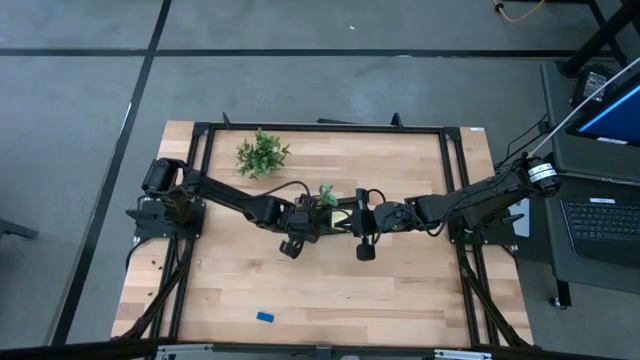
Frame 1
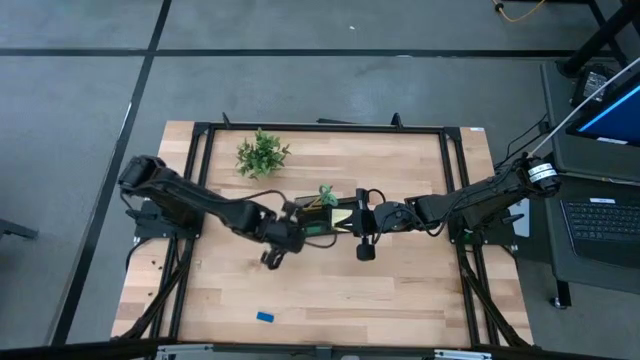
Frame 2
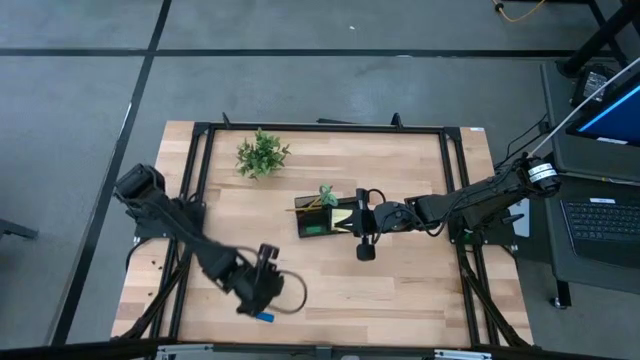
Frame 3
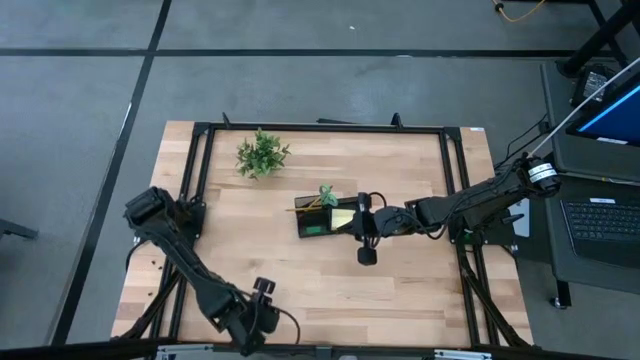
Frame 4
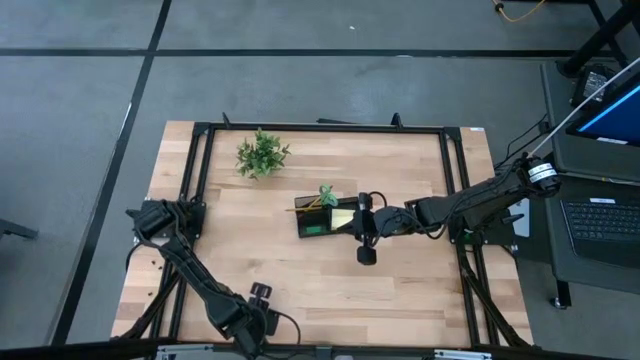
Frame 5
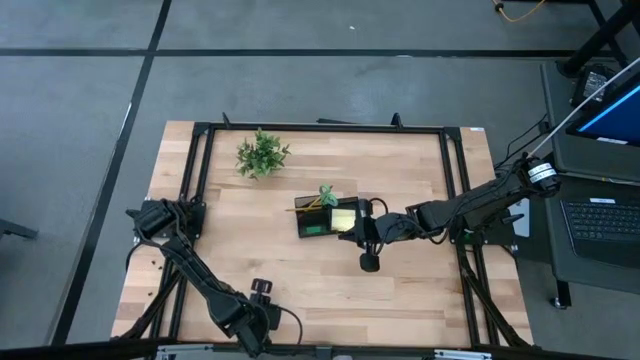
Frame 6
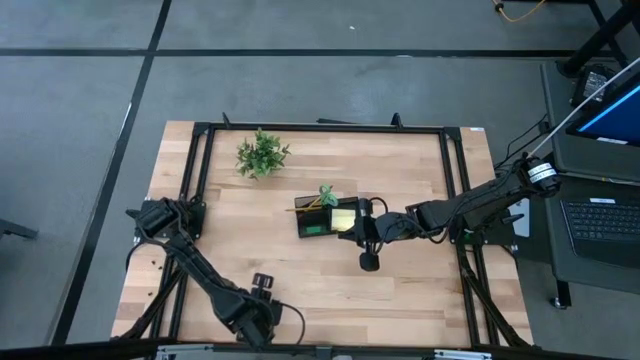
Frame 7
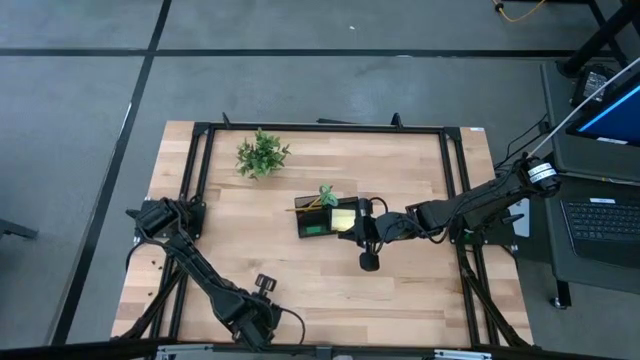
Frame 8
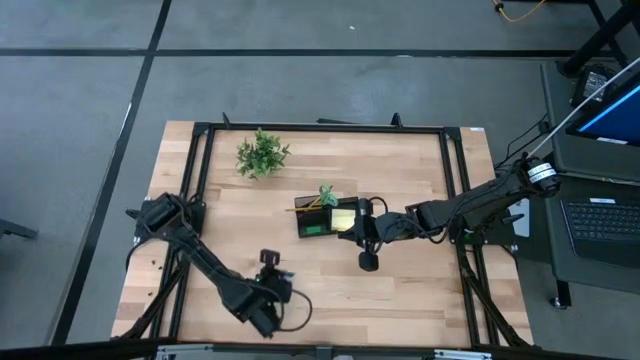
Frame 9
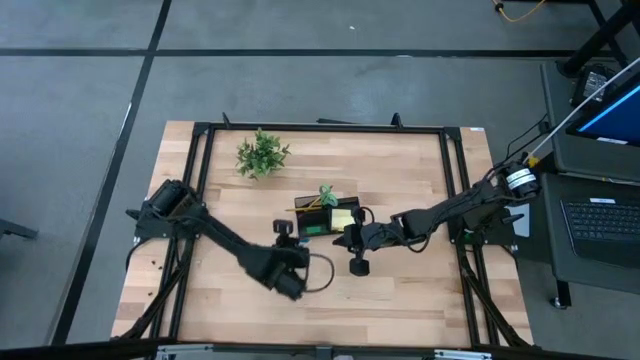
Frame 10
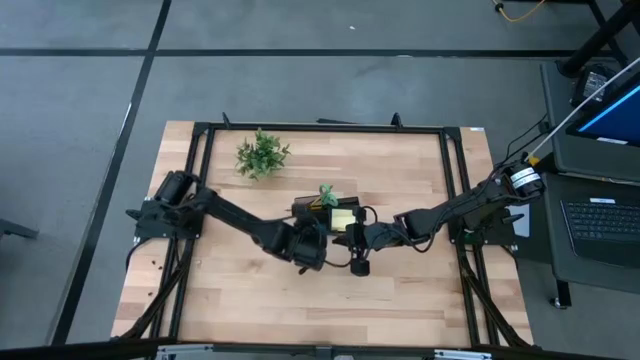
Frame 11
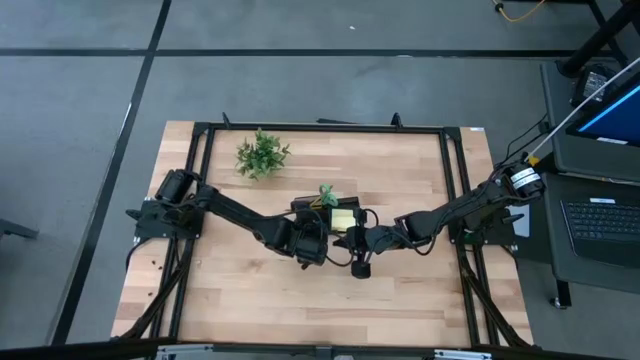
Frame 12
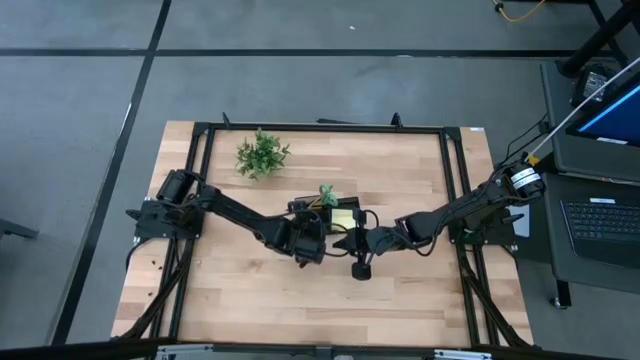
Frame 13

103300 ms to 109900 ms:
Task: Pick and place office supplies into organizer
Put the blue eraser into the black desk organizer

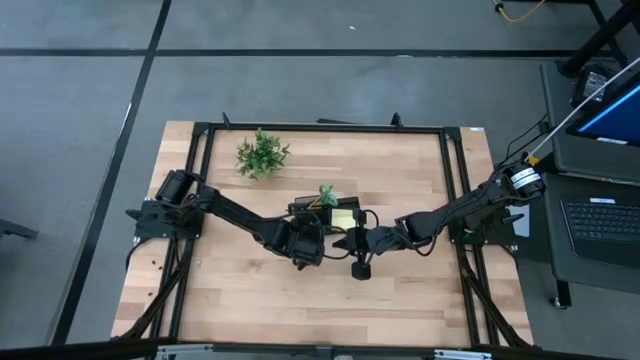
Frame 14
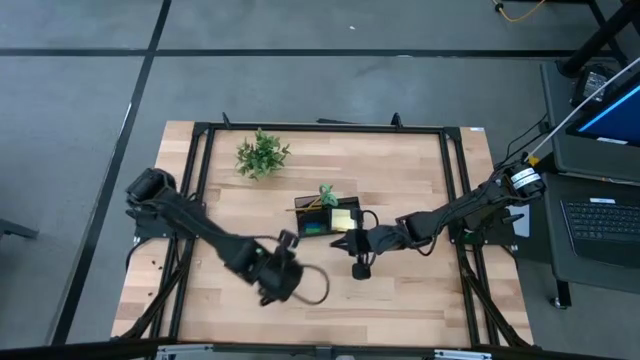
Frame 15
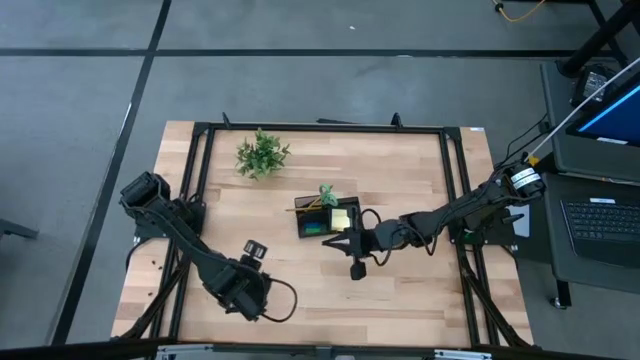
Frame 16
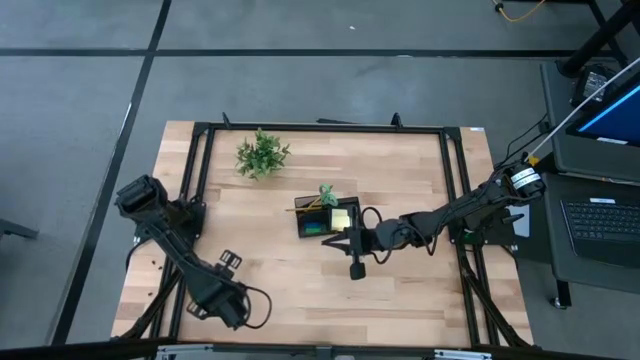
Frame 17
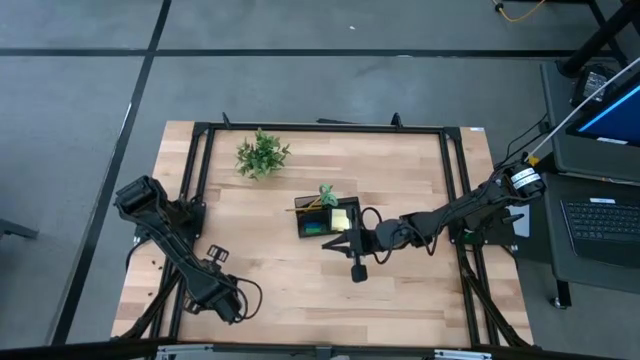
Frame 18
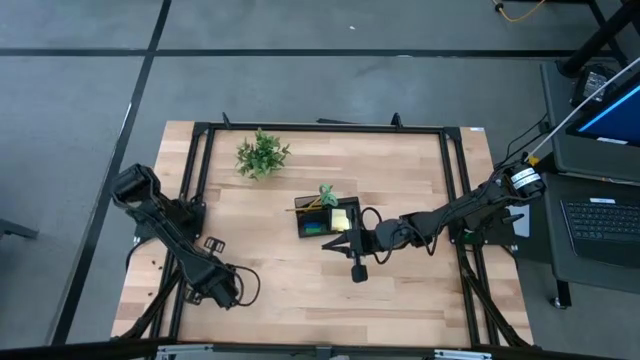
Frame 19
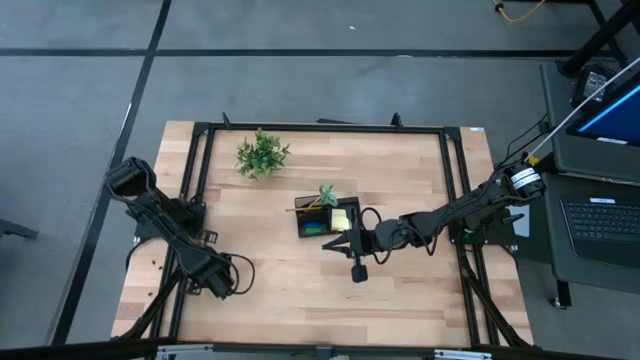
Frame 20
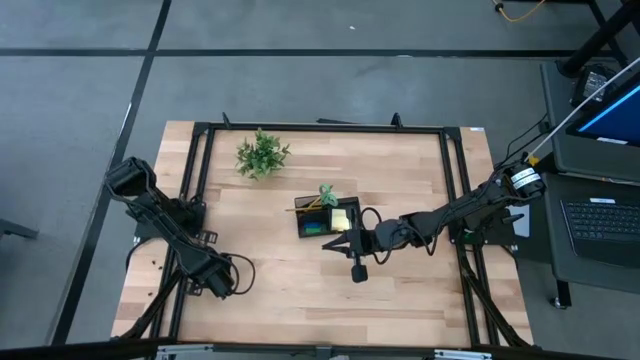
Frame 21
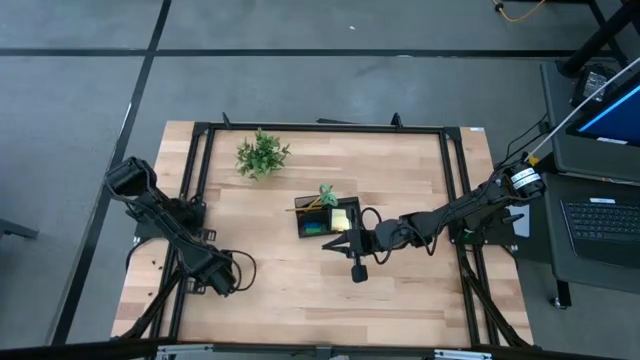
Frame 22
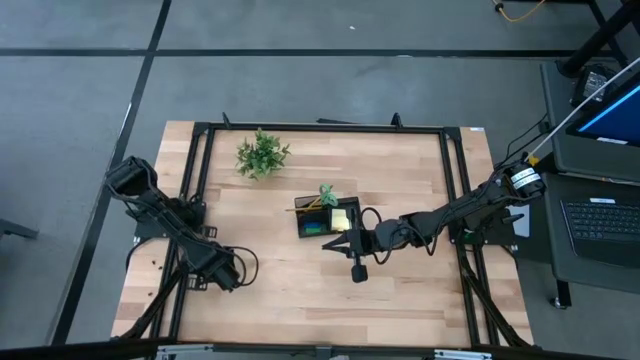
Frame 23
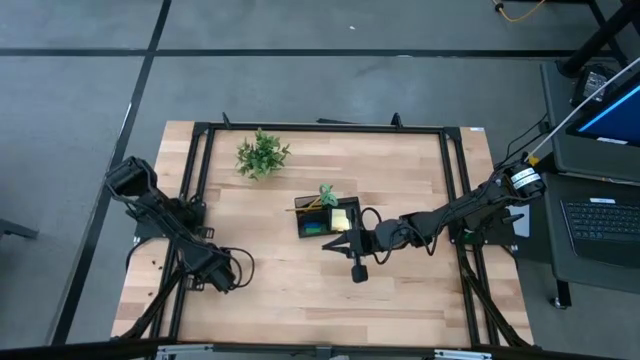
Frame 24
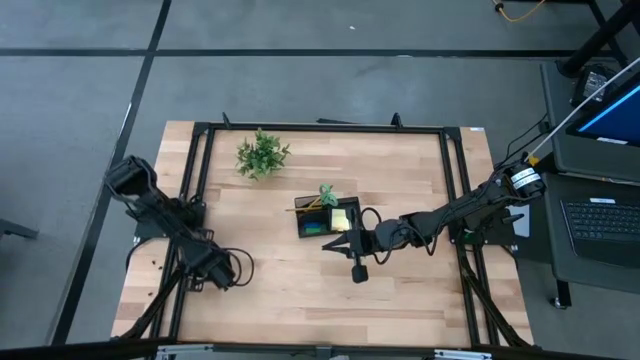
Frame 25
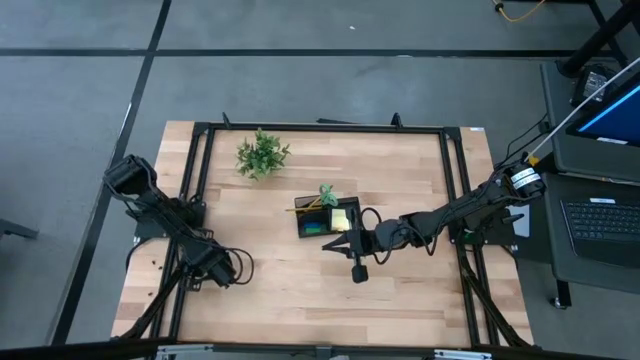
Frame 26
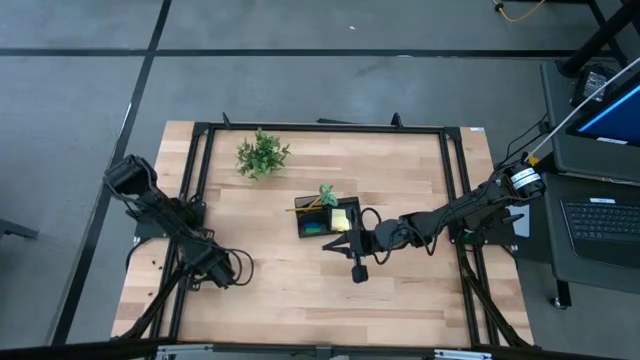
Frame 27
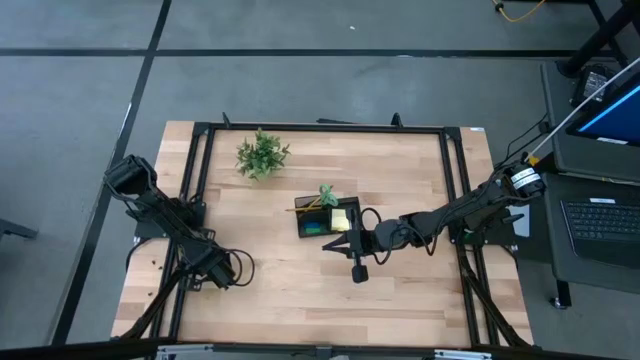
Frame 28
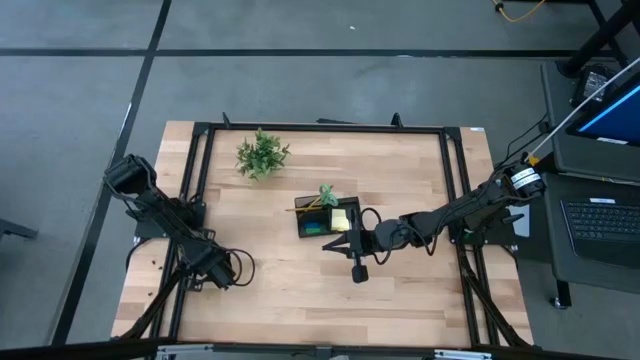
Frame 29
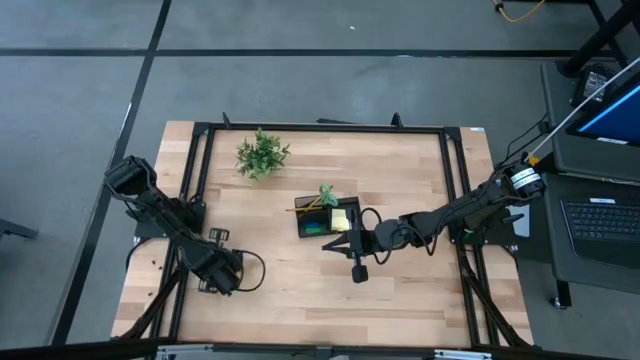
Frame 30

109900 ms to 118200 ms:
Put the green binder clip into the black desk organizer

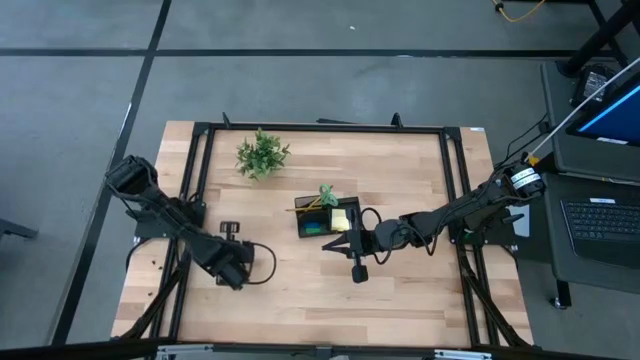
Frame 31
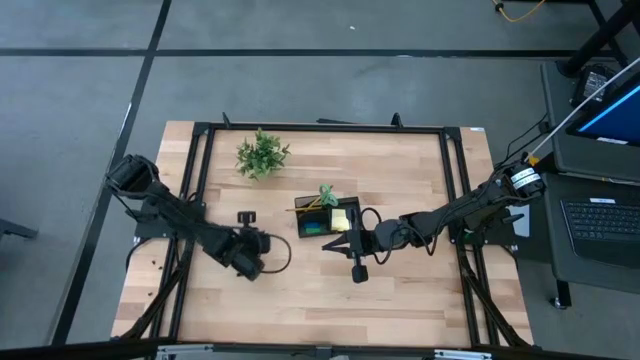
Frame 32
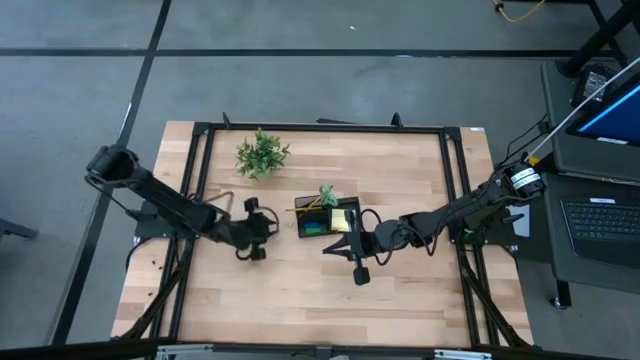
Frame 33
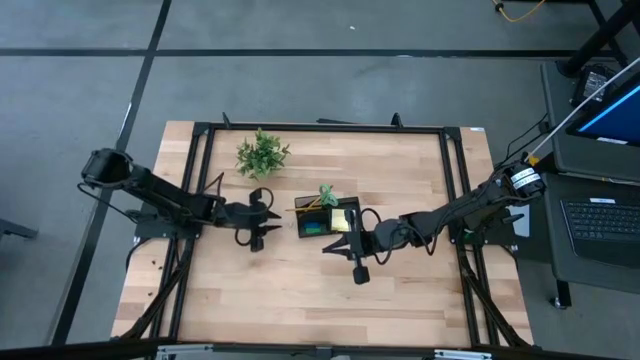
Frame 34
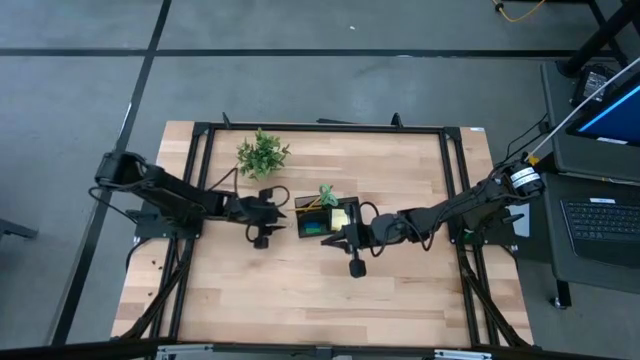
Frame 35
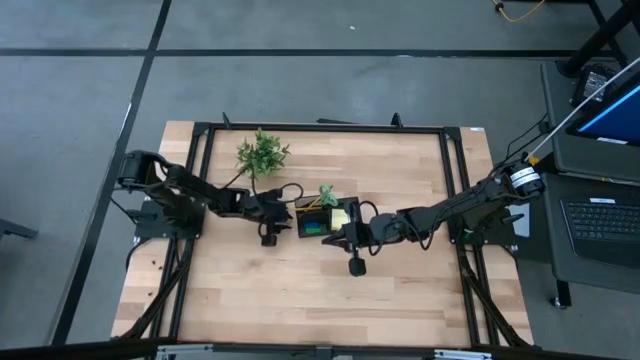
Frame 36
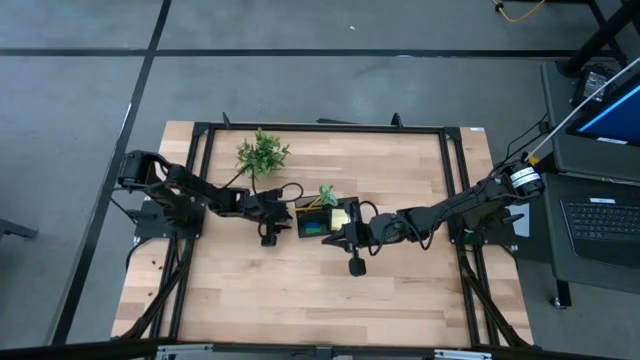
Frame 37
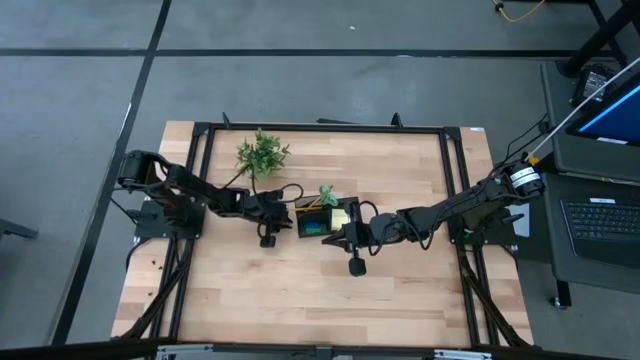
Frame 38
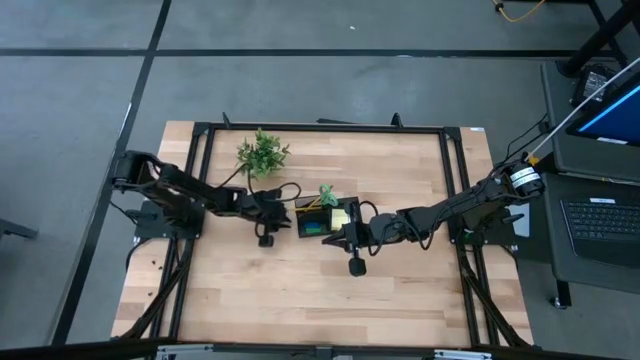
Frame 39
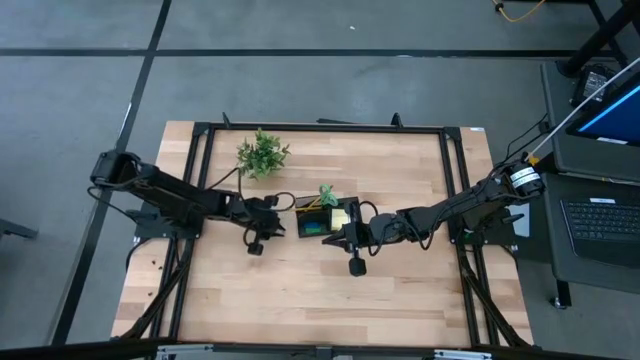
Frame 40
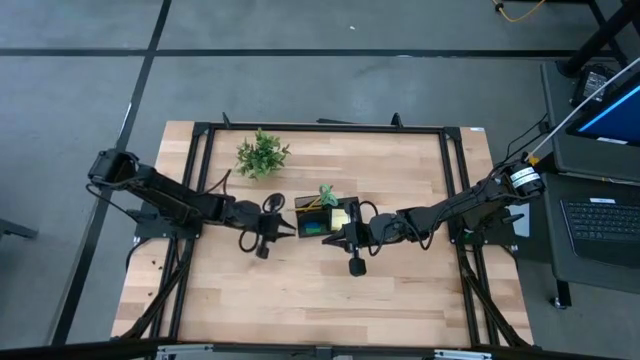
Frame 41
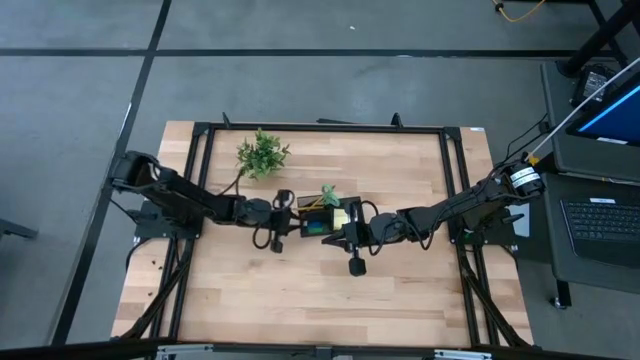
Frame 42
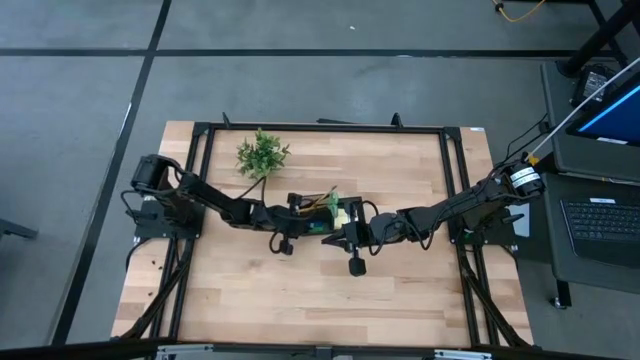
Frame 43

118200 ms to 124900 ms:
Put the green binder clip into the black desk organizer
